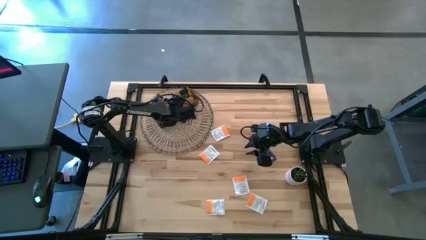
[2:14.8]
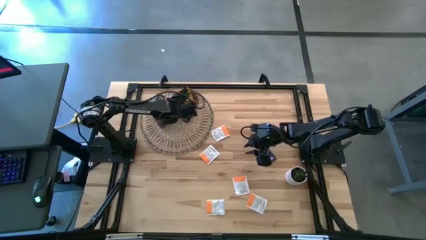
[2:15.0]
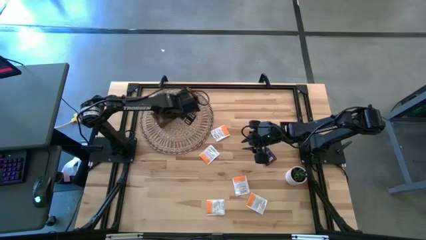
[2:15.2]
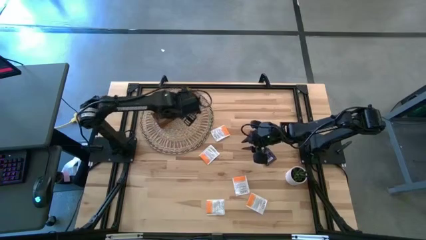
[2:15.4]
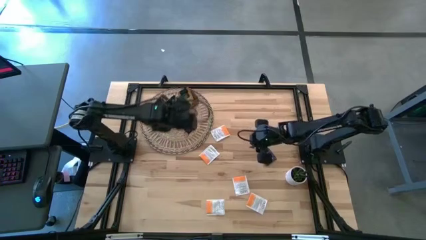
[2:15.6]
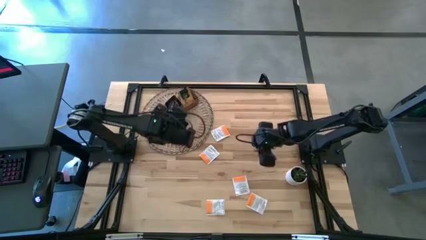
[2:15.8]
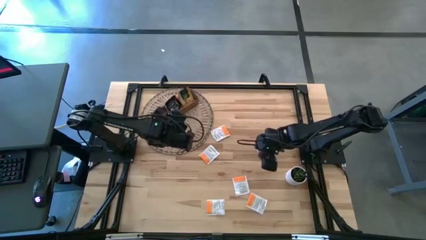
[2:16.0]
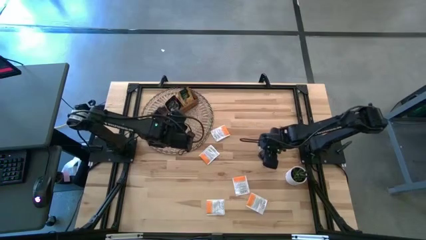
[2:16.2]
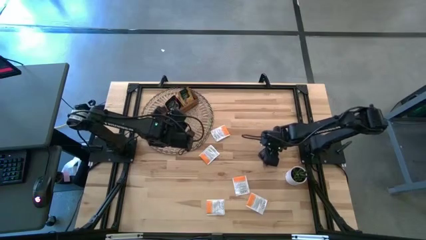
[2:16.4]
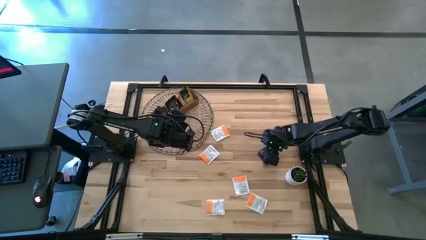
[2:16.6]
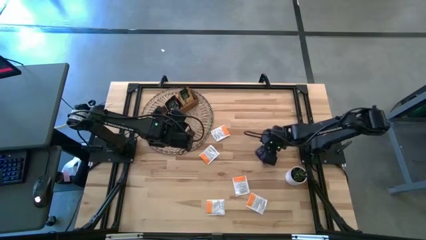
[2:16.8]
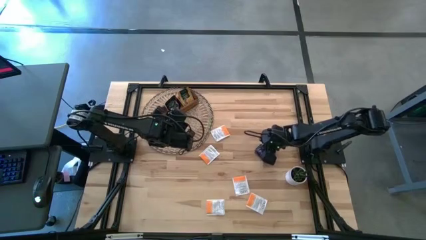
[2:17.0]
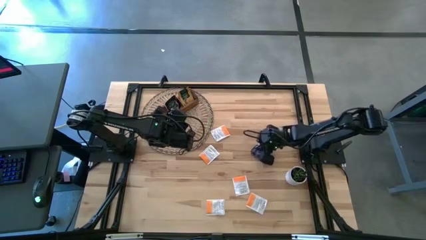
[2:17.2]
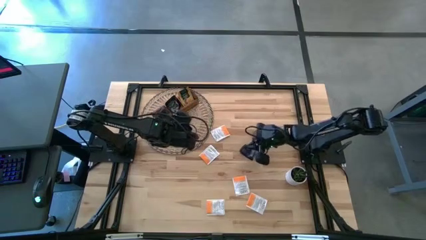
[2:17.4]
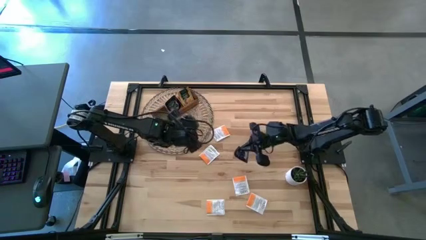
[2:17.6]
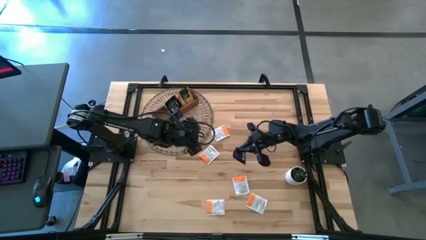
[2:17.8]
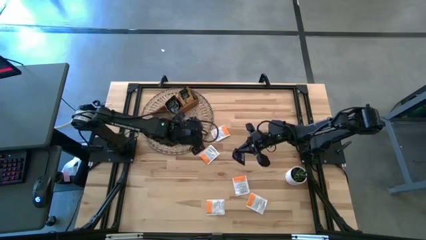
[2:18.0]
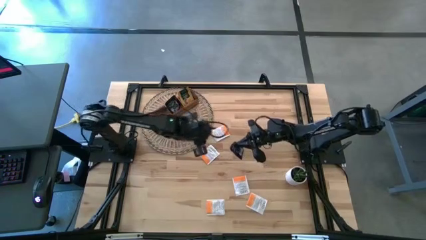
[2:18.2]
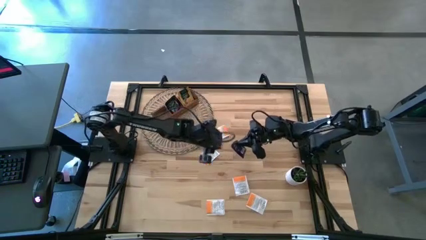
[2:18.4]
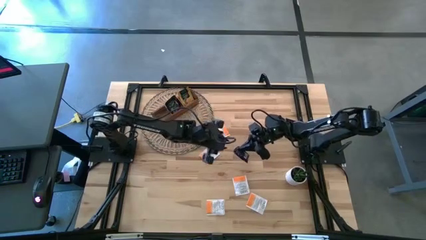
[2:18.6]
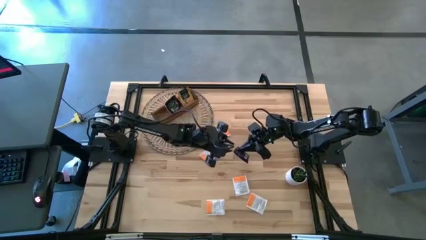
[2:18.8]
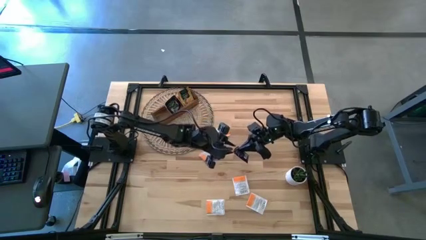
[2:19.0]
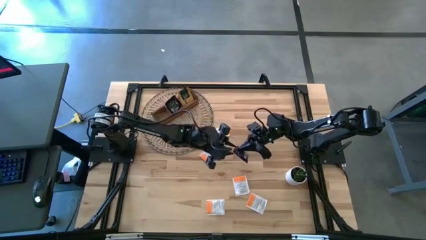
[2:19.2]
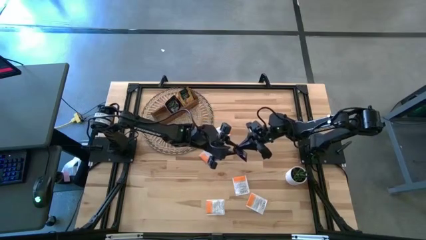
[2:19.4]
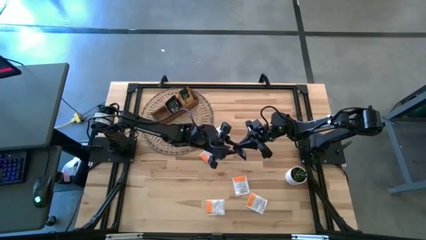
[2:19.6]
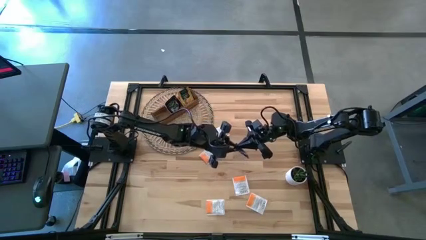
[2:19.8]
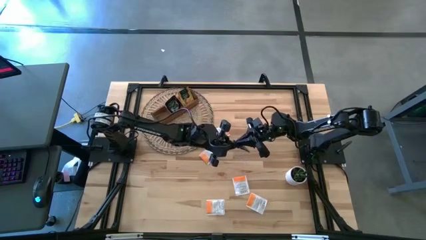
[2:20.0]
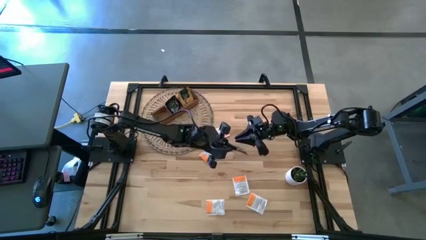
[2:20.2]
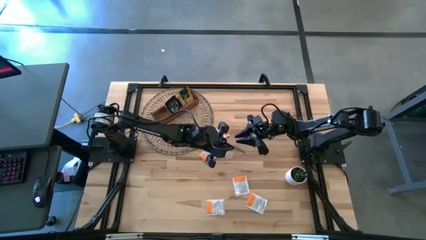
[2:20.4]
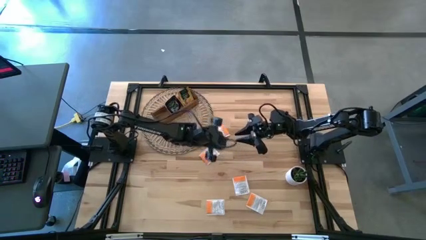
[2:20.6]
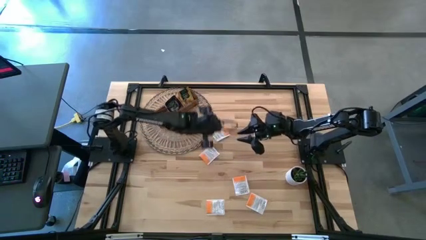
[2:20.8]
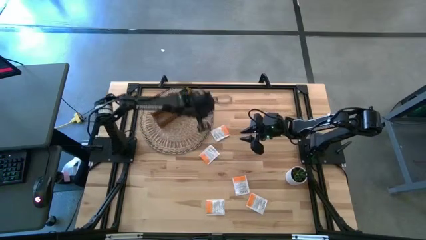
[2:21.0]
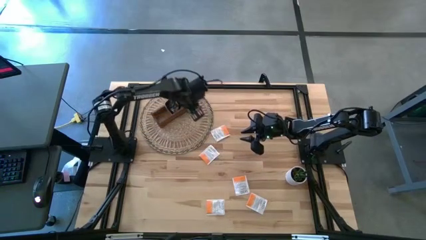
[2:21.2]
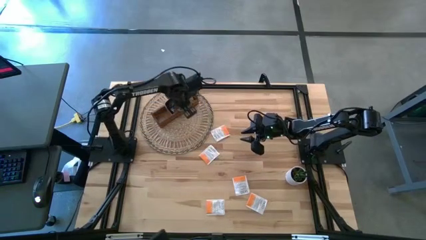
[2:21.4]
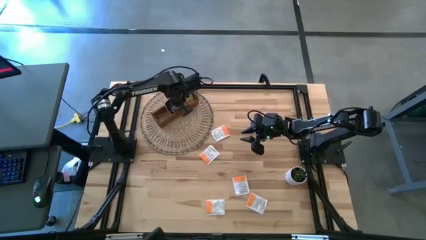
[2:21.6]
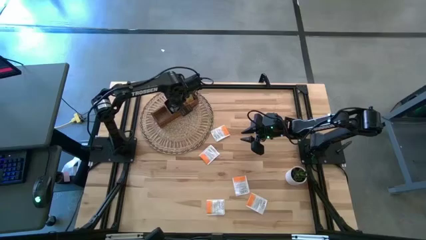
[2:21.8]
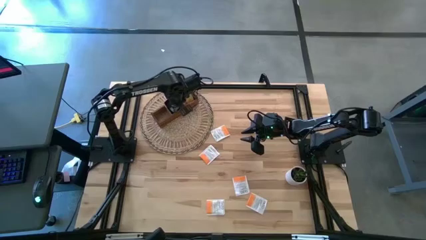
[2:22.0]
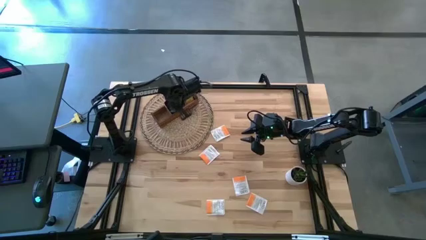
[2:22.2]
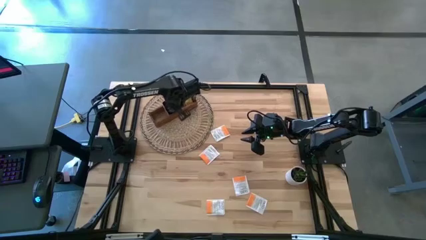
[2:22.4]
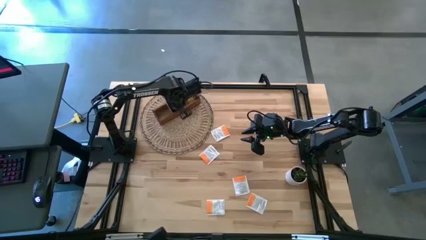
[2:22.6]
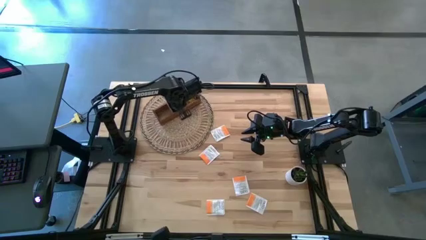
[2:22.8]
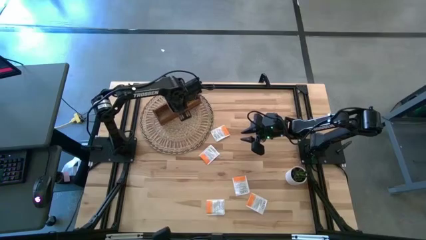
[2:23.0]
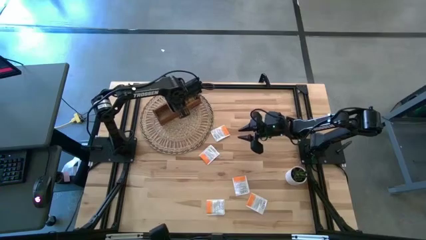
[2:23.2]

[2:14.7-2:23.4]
Task: Pick & Place Tea
Put the purple tea bag into the middle section of the wooden organizer

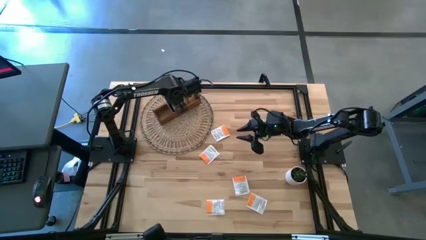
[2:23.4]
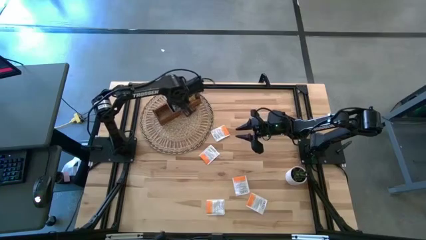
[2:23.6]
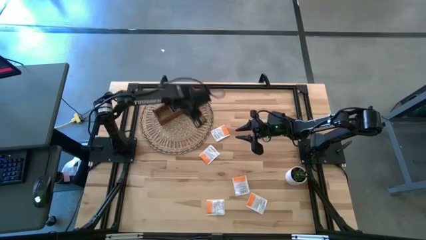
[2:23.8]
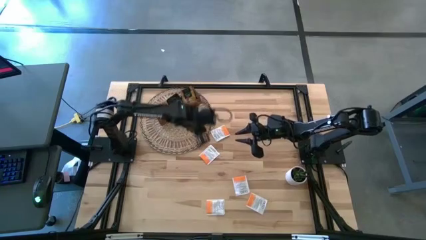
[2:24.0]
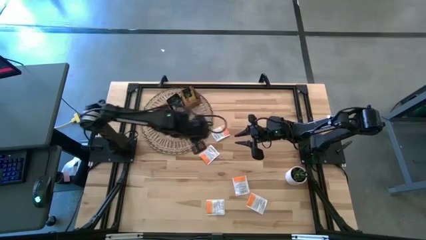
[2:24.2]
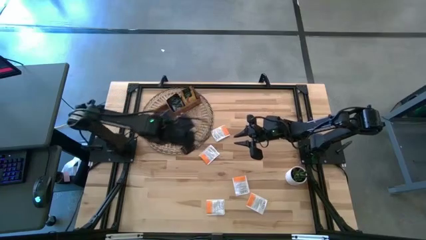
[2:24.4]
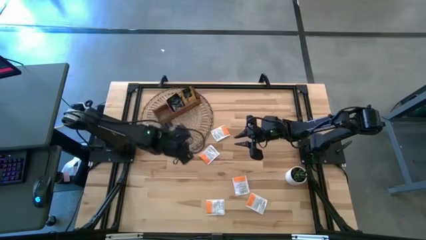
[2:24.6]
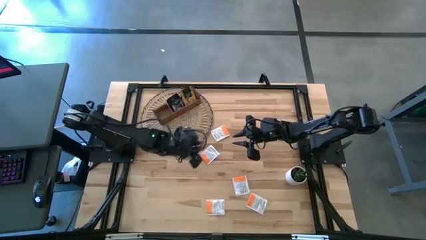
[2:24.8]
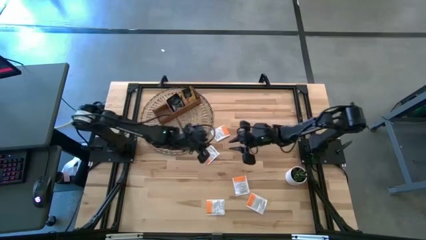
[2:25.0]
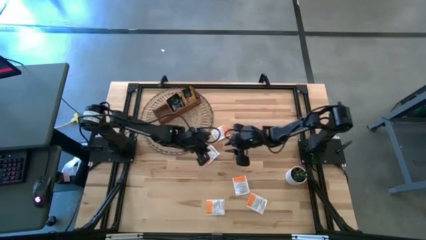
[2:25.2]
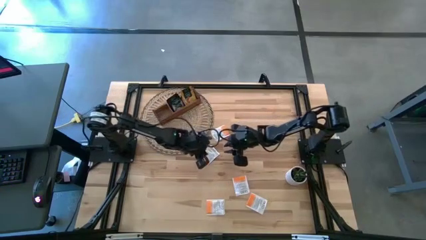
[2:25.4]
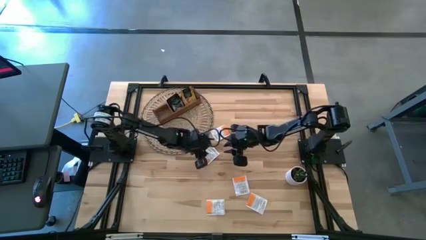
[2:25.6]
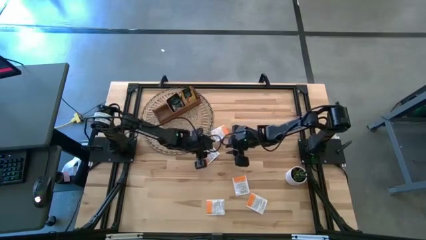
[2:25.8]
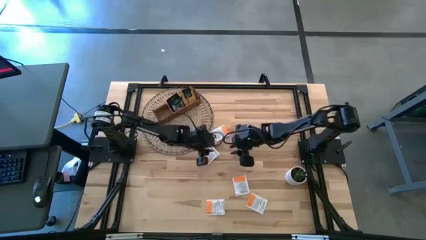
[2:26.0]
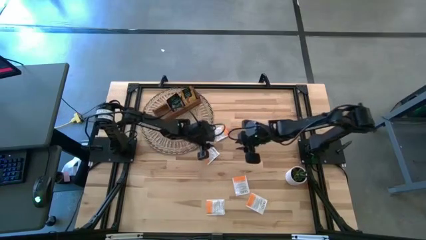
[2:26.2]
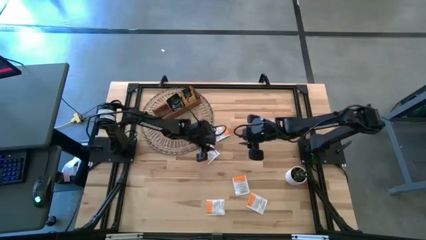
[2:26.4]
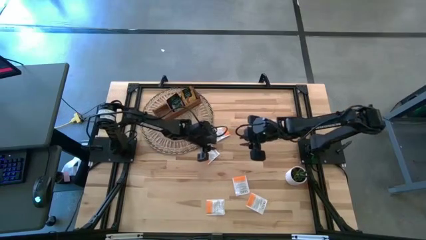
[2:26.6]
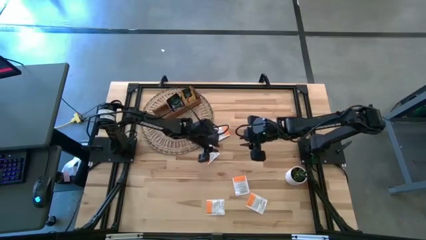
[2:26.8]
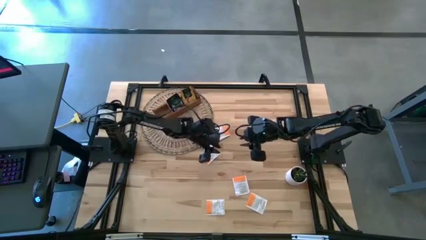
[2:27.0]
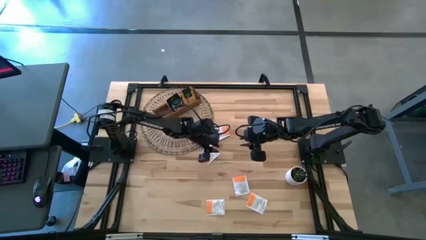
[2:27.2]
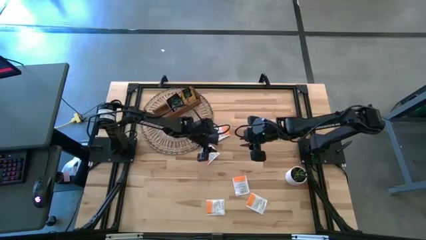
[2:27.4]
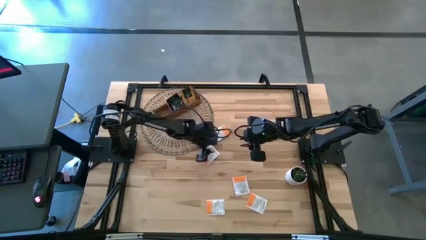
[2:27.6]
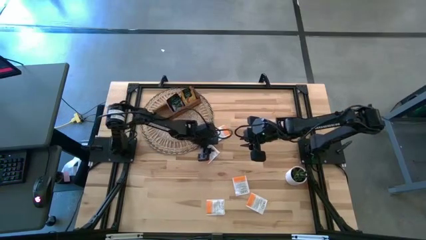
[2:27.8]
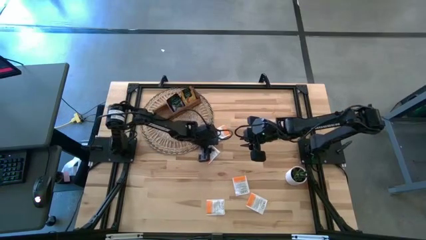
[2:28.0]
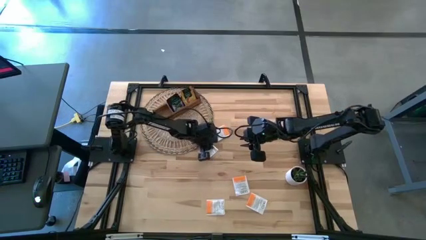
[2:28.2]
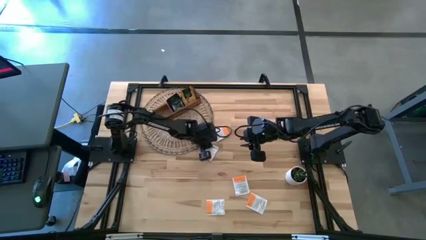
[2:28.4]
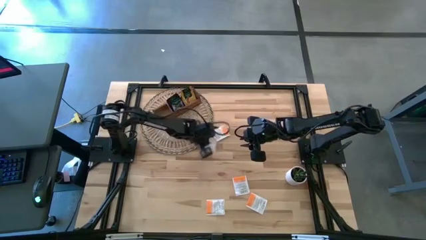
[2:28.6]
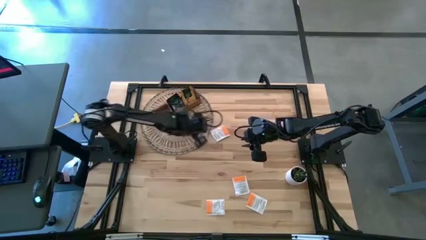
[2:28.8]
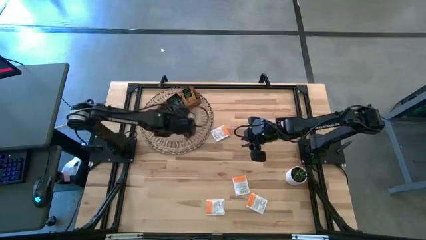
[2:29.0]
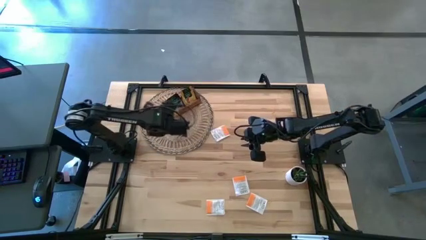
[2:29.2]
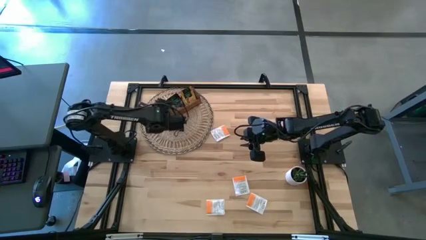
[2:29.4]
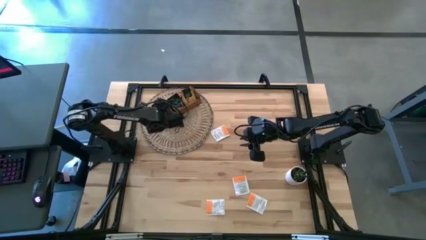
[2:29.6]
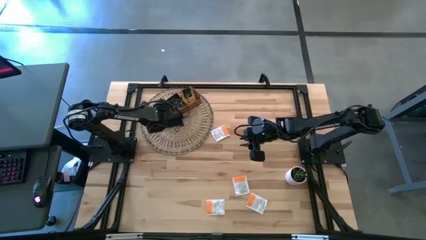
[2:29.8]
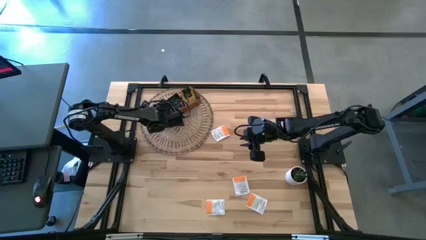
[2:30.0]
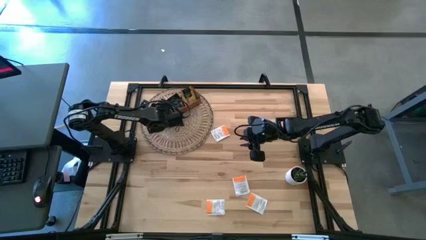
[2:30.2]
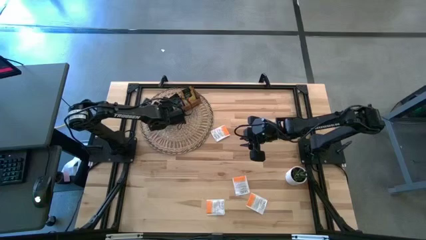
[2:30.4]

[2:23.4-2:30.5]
Put the orange tea bag into the left section of the wooden organizer
